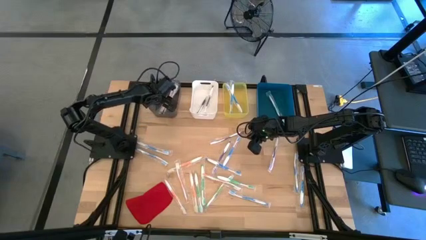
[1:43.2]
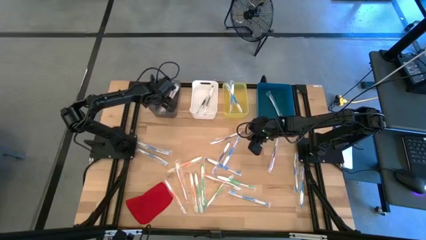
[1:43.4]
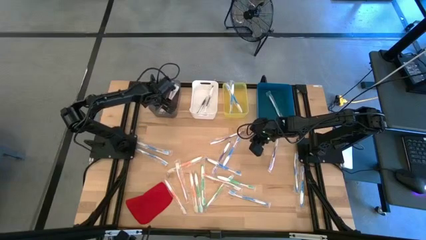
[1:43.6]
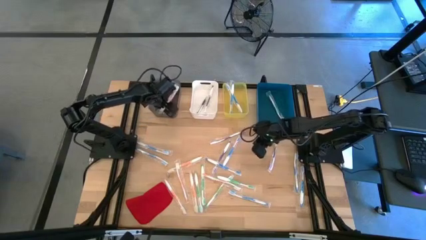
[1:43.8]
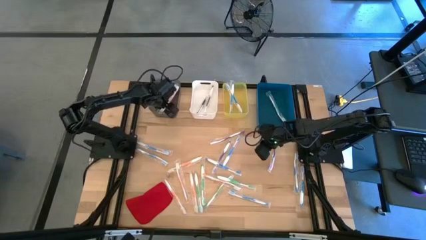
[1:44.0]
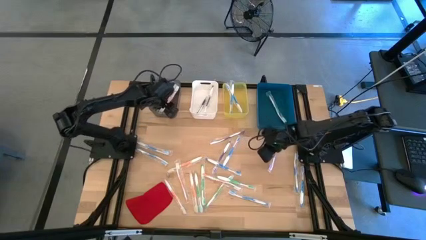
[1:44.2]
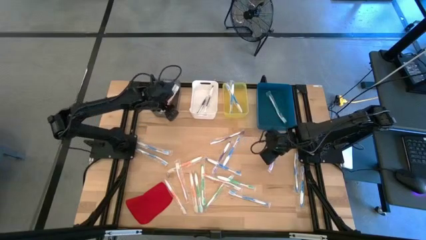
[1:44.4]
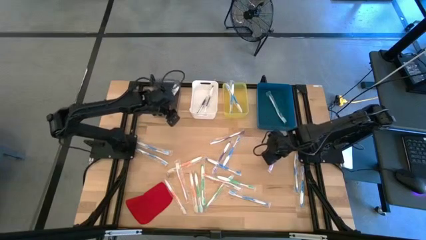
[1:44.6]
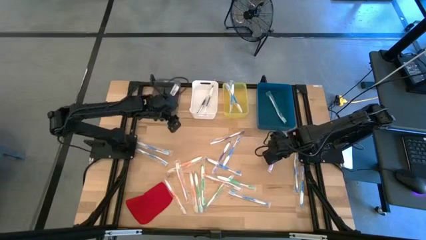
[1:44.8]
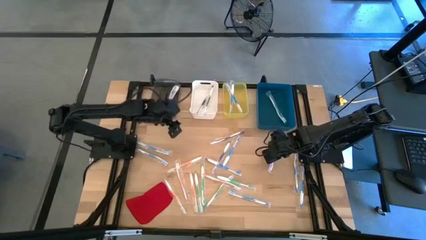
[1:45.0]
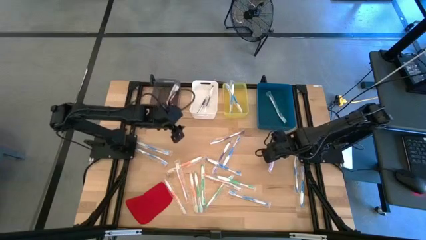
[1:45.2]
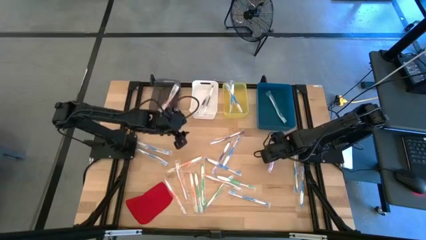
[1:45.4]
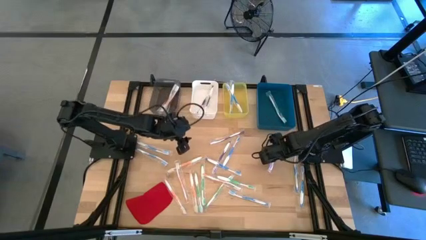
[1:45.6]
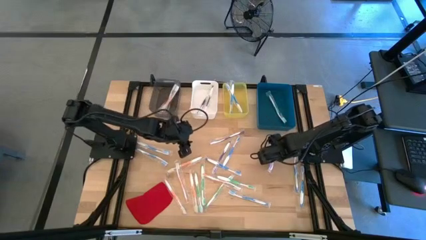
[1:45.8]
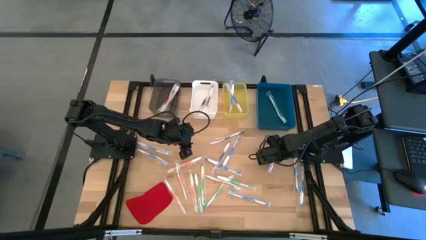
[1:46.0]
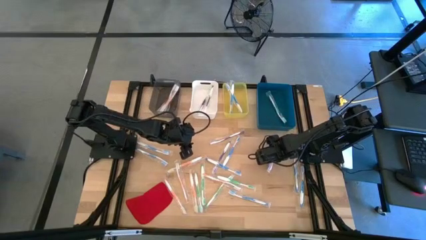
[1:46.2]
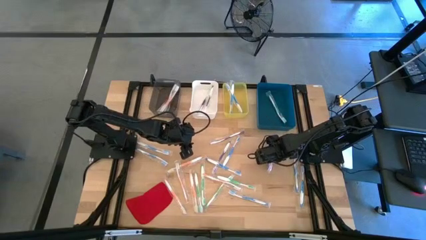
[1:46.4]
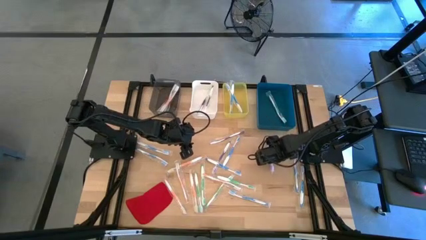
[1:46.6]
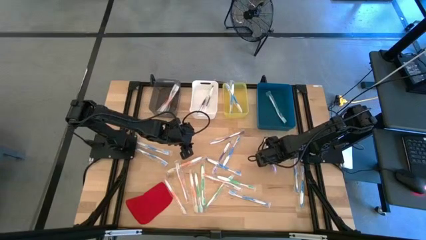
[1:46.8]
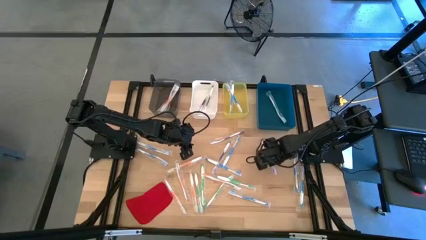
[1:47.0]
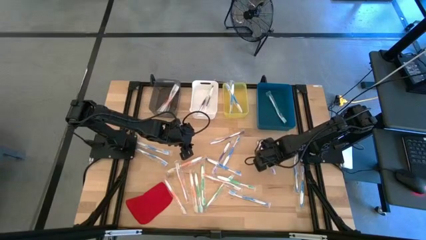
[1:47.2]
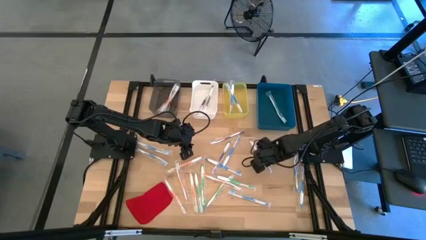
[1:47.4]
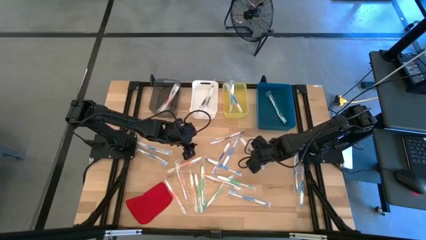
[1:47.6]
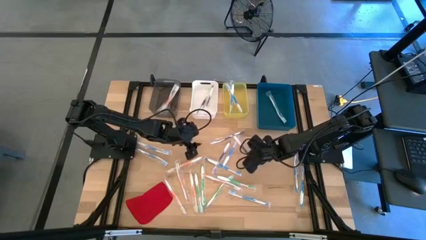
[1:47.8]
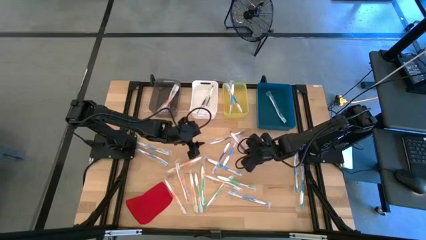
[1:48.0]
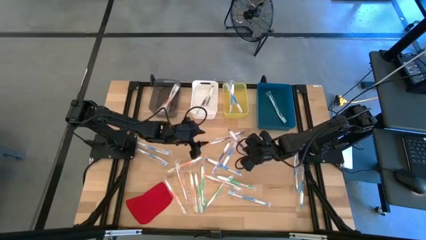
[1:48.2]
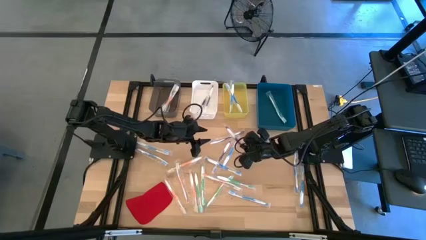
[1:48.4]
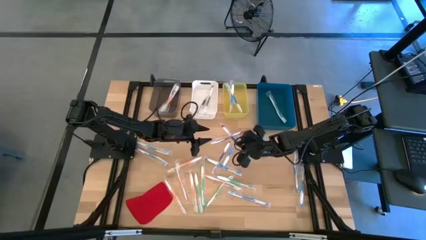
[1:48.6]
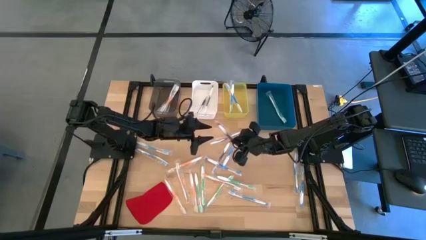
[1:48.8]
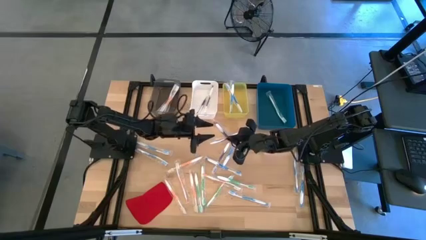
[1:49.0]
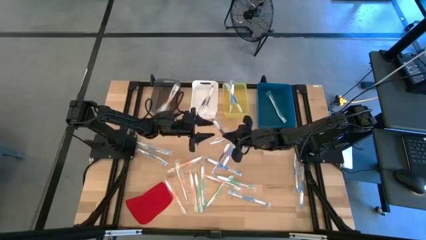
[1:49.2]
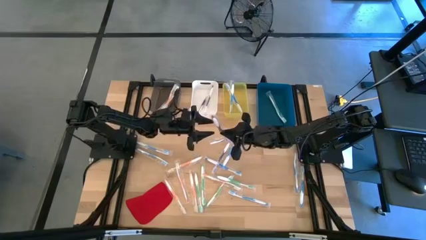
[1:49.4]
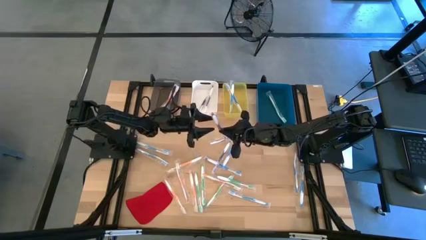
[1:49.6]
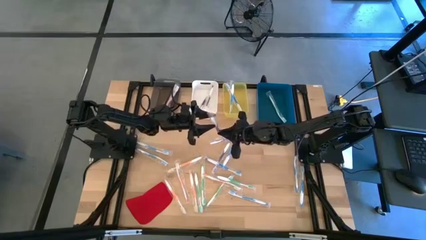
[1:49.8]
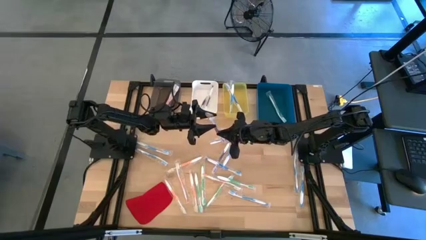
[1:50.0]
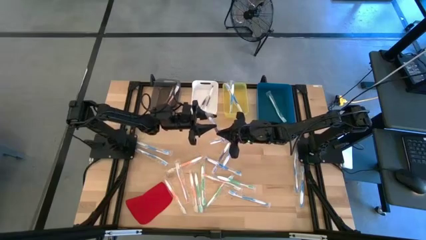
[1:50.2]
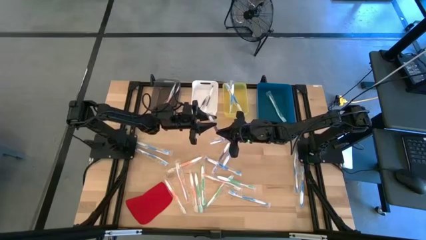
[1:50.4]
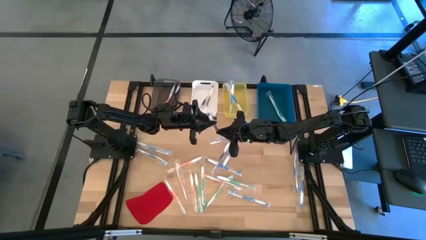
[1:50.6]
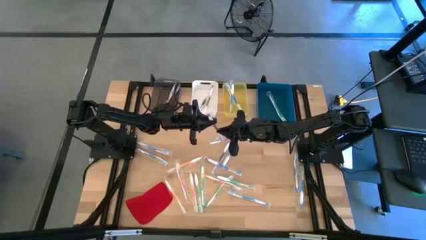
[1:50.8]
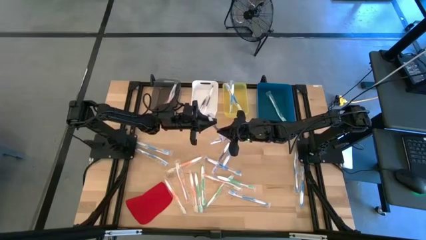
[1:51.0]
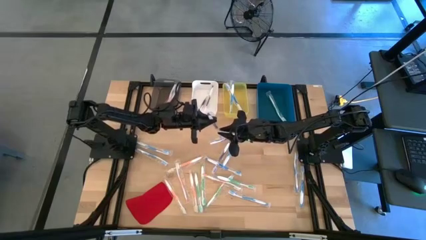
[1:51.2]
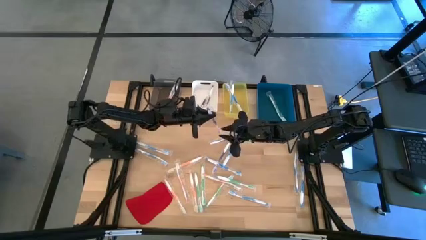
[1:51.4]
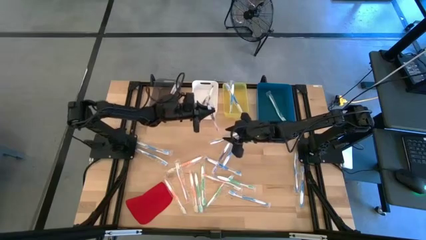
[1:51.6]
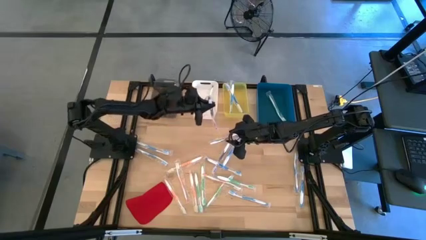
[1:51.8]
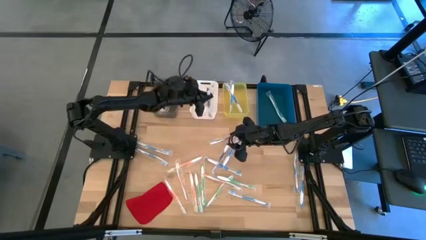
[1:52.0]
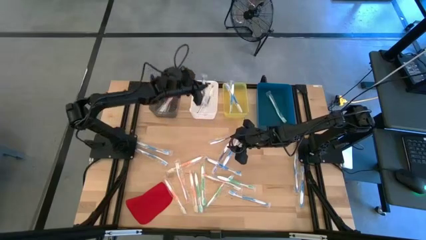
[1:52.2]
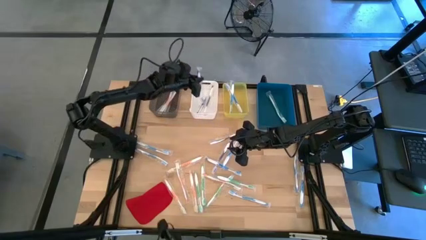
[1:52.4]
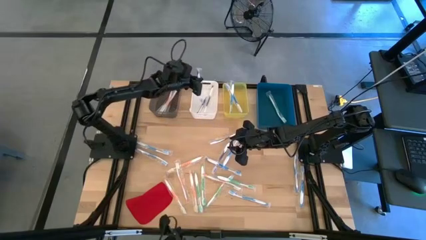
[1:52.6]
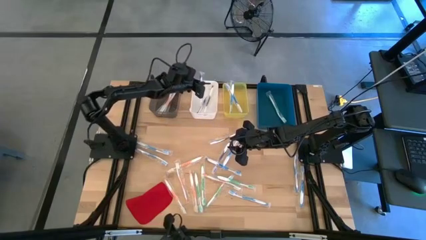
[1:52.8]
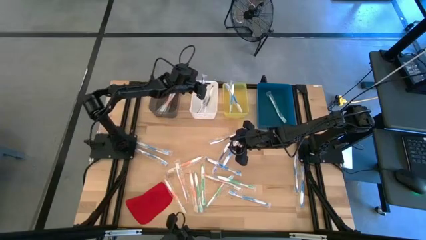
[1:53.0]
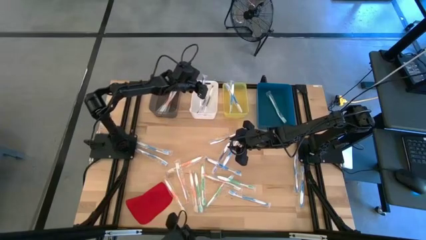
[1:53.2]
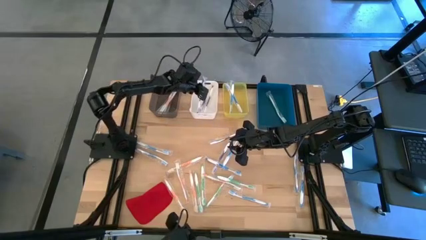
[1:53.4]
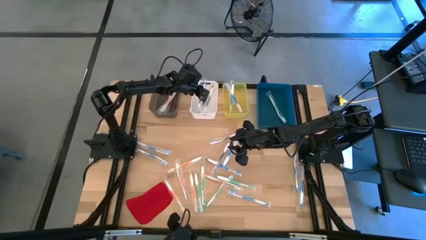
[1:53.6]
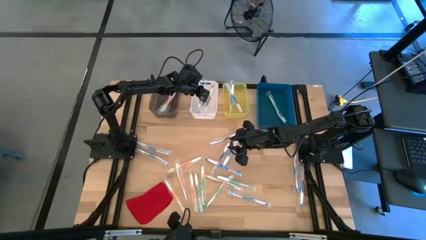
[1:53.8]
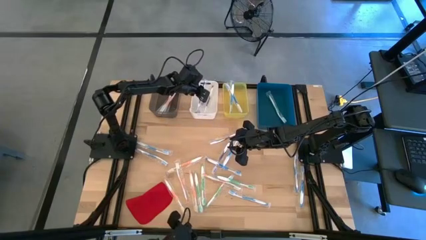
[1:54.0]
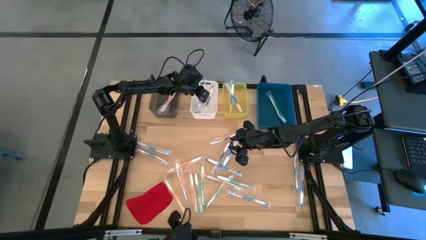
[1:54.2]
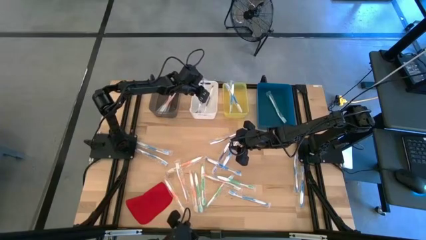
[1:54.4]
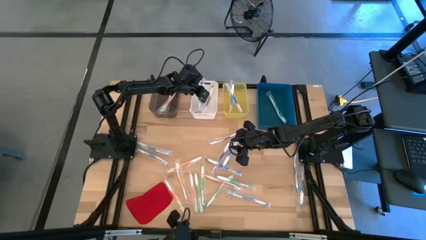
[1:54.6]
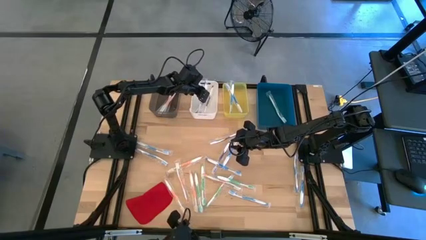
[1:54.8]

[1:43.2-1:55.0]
Task: Pick & Place Toothbrushes
Put the violet toothbrush into the white bin

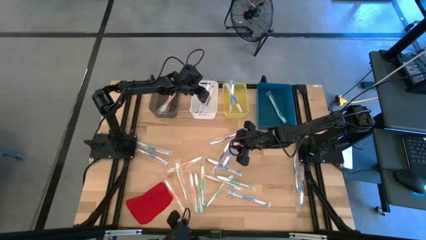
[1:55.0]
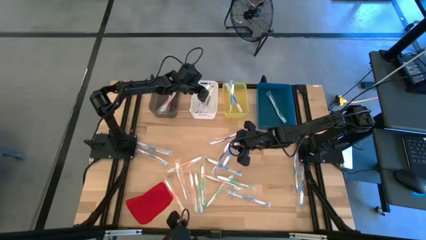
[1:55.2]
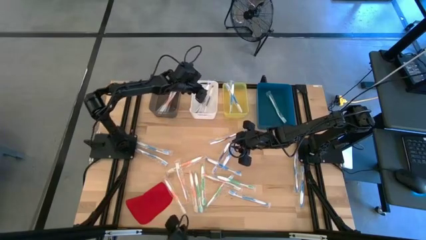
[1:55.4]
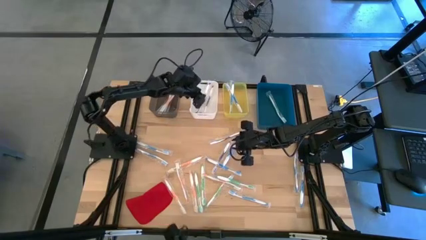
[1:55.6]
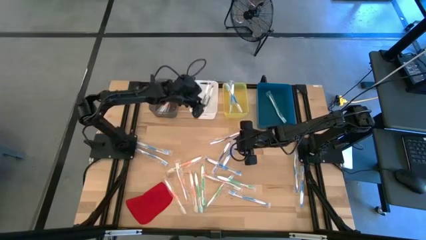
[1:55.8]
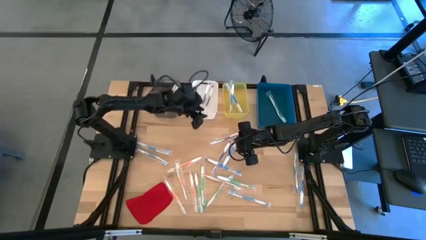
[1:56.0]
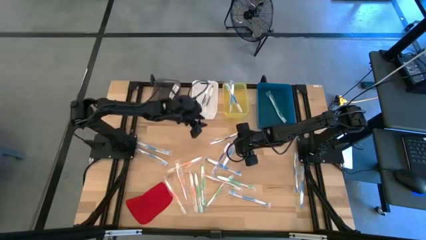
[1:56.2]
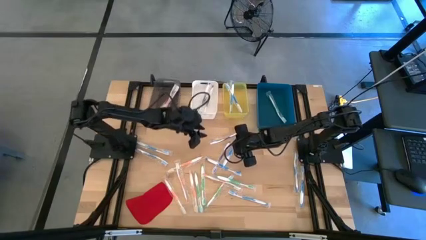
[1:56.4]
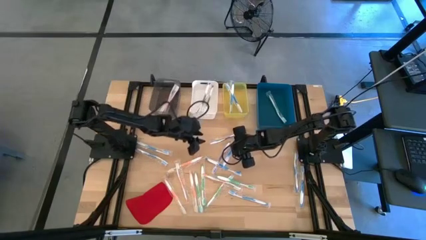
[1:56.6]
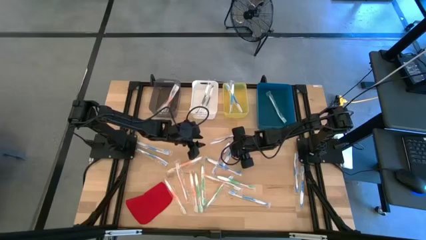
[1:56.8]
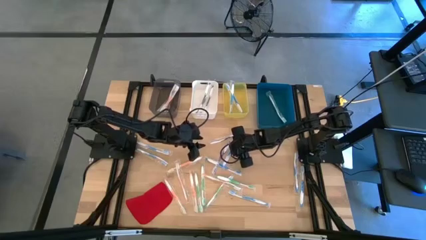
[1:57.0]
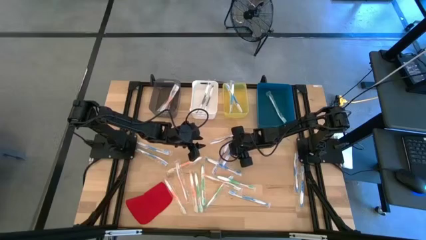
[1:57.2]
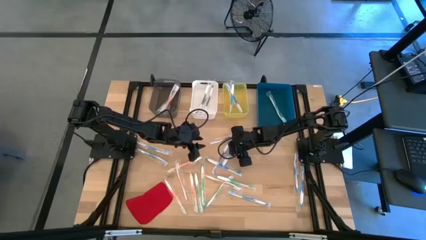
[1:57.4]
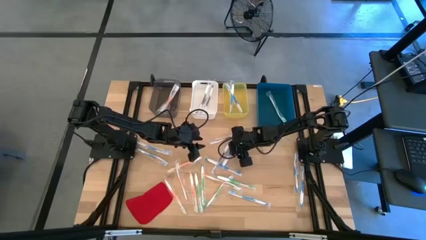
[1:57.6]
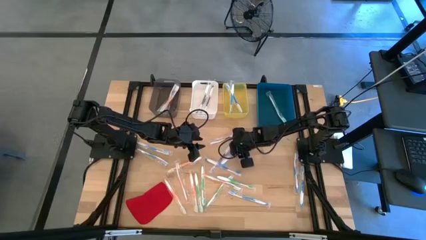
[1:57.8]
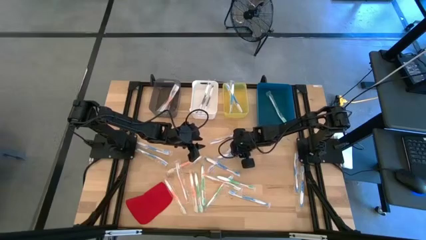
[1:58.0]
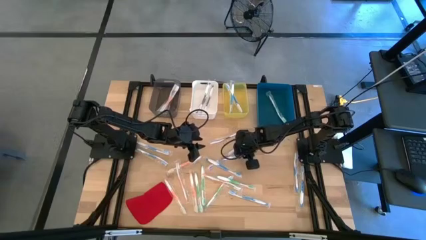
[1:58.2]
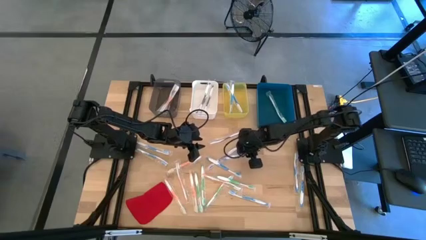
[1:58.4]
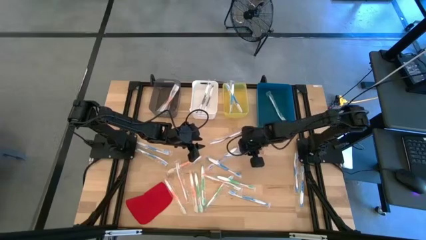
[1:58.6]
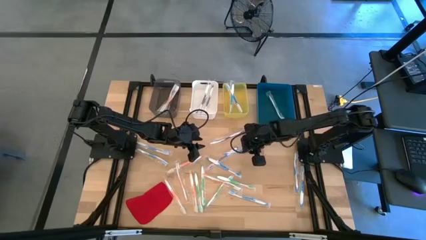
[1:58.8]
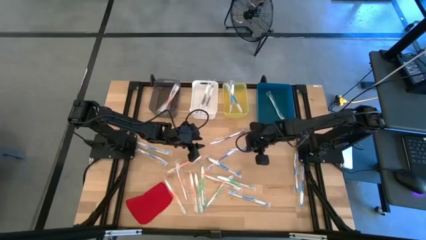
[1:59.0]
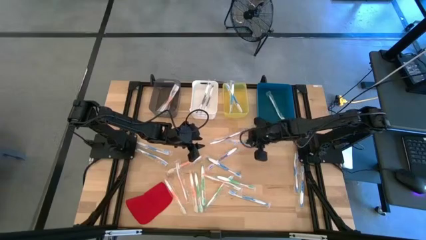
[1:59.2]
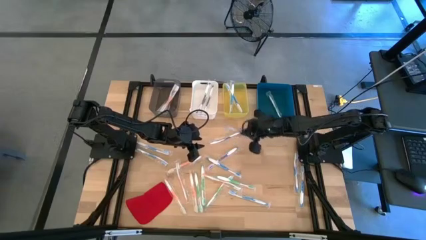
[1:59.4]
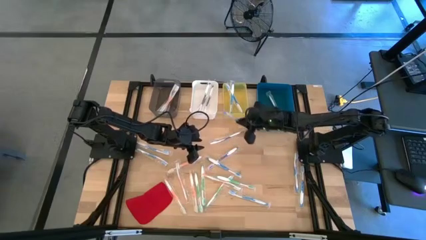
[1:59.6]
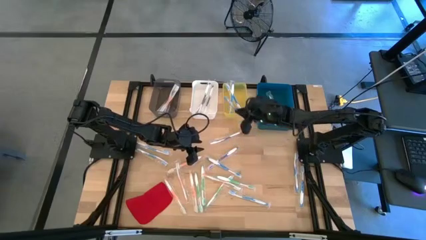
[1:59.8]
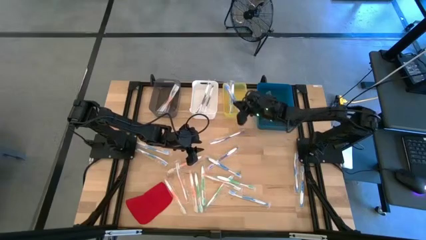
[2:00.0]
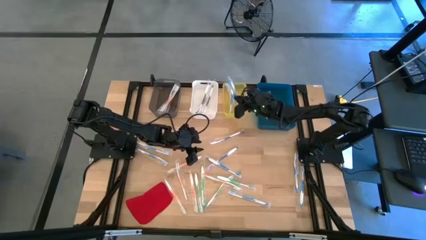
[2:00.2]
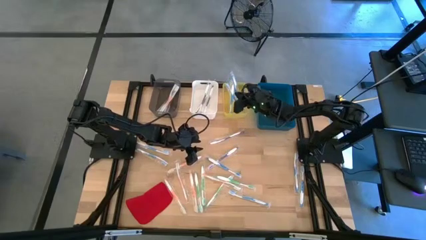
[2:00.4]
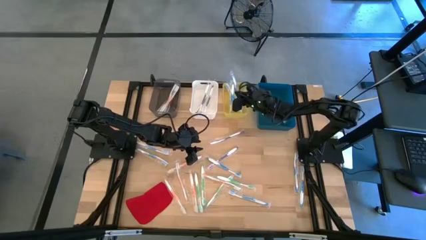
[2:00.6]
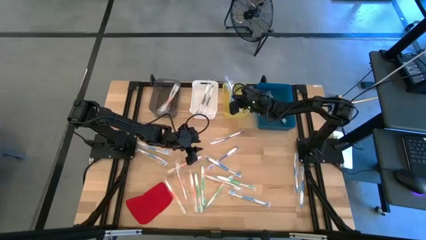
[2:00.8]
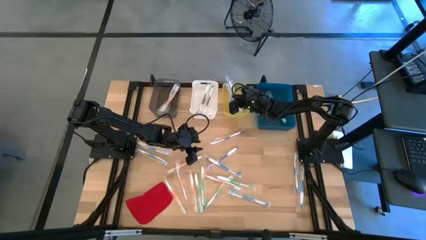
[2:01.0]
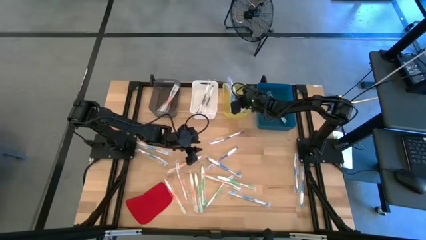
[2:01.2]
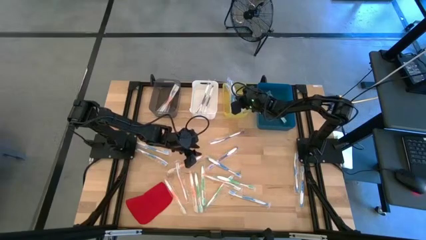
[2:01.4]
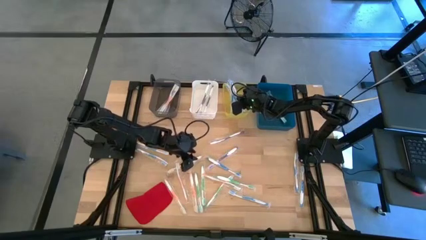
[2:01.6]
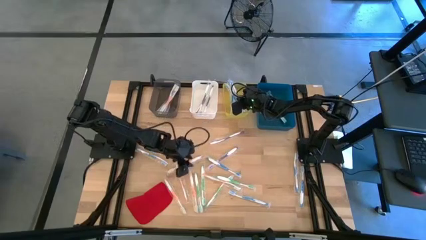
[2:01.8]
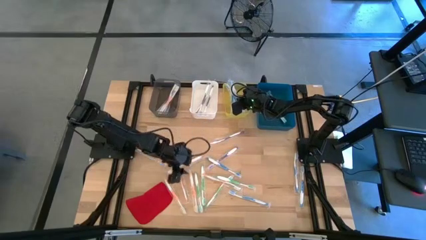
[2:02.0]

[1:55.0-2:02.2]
Put the blue toothbrush into the yellow bin
